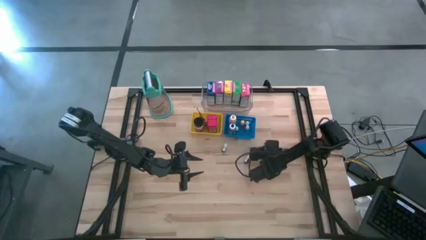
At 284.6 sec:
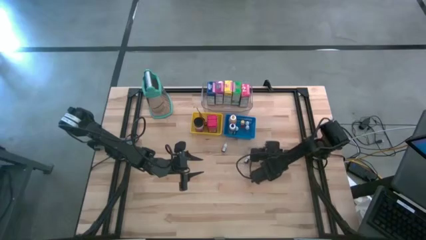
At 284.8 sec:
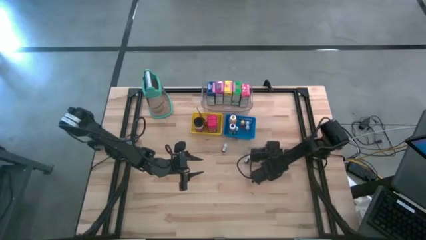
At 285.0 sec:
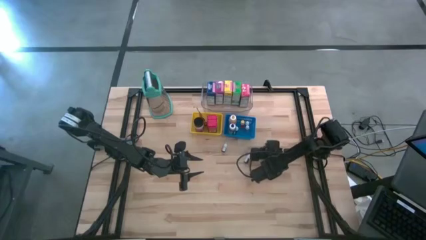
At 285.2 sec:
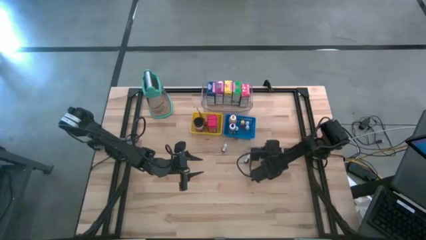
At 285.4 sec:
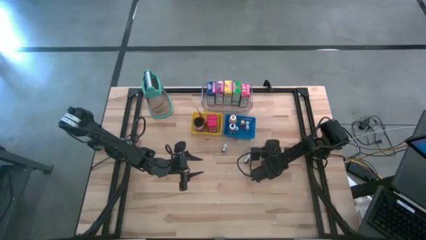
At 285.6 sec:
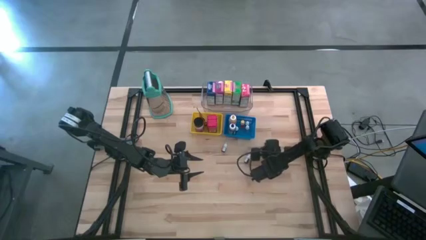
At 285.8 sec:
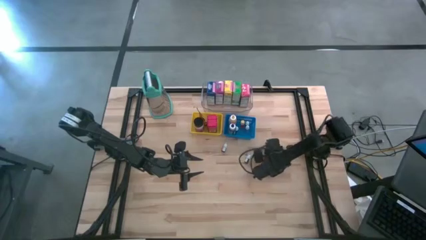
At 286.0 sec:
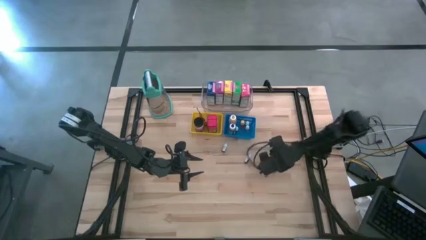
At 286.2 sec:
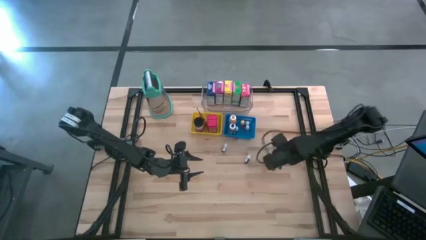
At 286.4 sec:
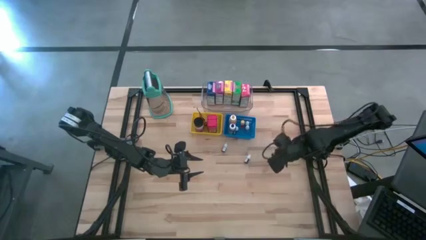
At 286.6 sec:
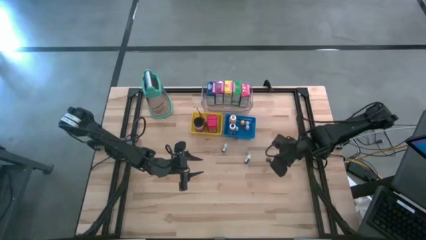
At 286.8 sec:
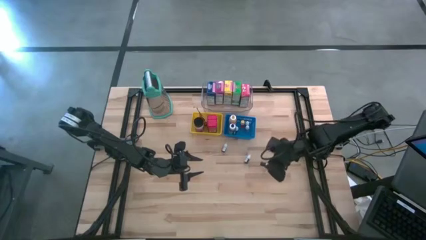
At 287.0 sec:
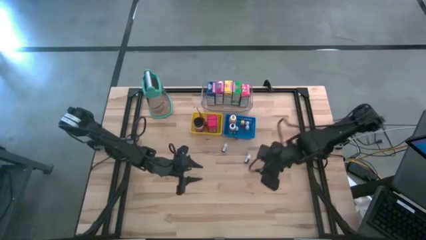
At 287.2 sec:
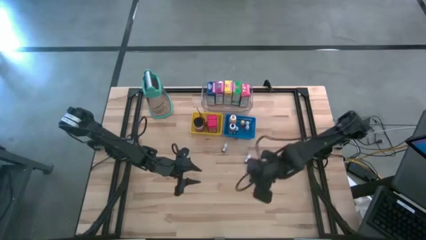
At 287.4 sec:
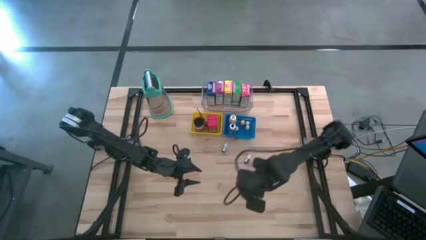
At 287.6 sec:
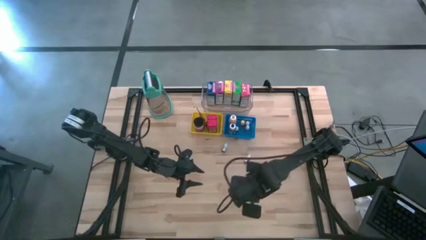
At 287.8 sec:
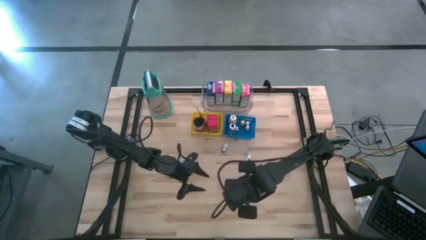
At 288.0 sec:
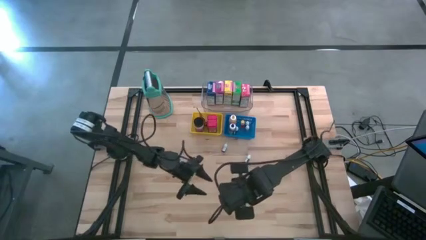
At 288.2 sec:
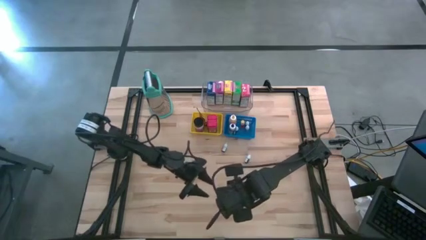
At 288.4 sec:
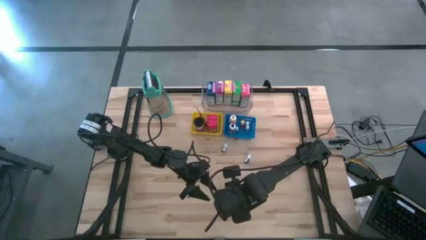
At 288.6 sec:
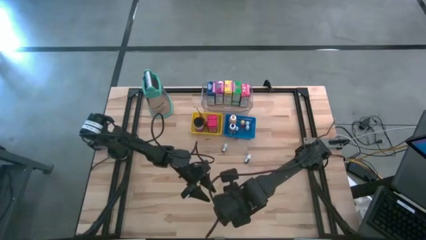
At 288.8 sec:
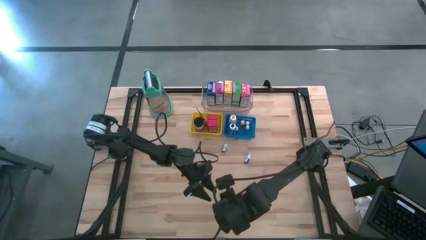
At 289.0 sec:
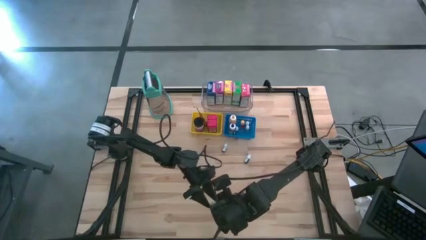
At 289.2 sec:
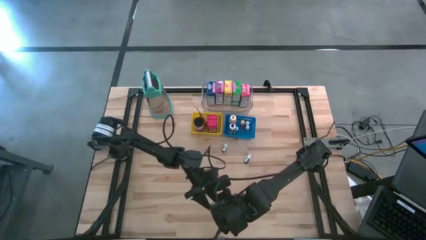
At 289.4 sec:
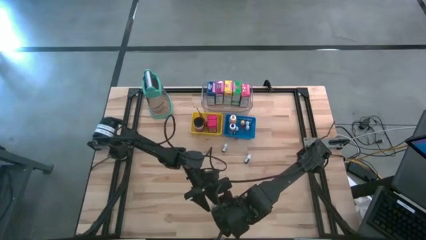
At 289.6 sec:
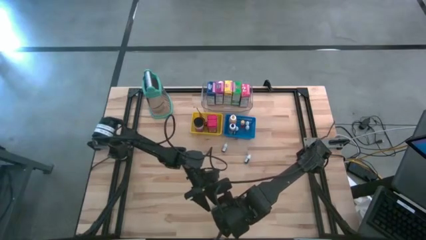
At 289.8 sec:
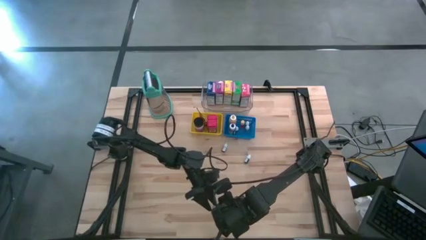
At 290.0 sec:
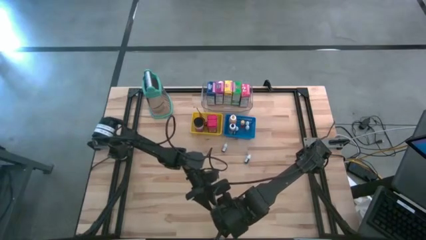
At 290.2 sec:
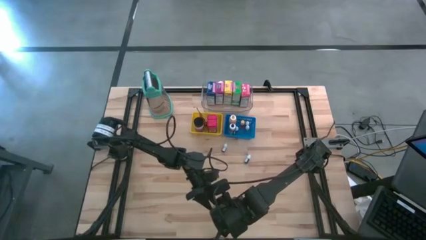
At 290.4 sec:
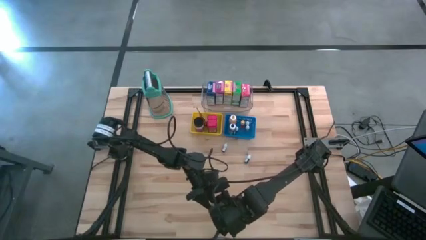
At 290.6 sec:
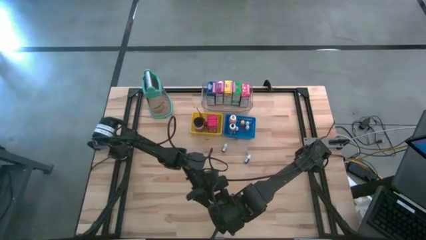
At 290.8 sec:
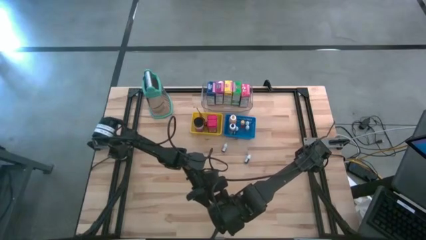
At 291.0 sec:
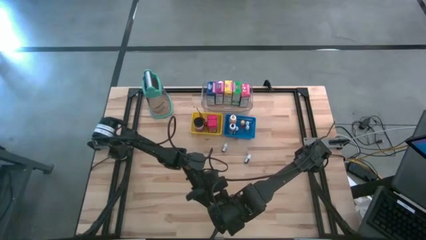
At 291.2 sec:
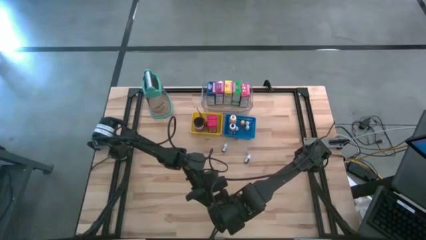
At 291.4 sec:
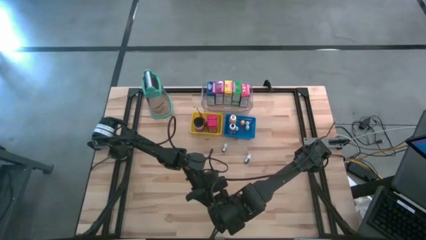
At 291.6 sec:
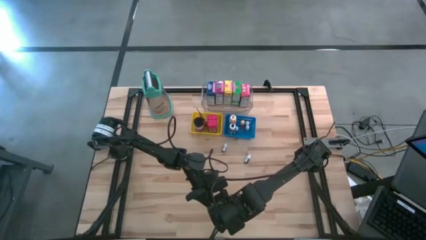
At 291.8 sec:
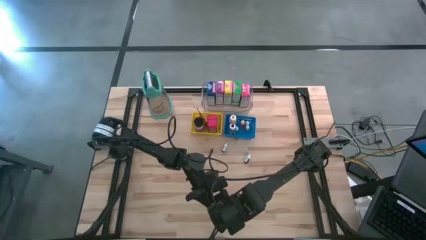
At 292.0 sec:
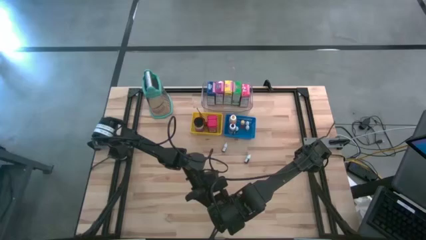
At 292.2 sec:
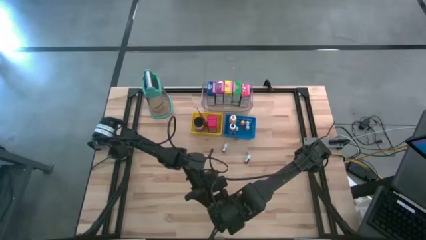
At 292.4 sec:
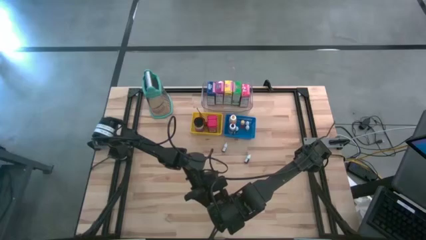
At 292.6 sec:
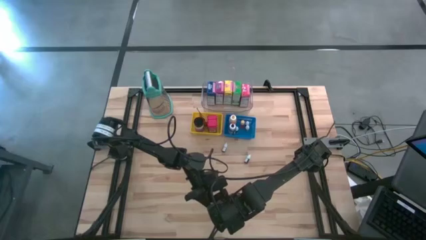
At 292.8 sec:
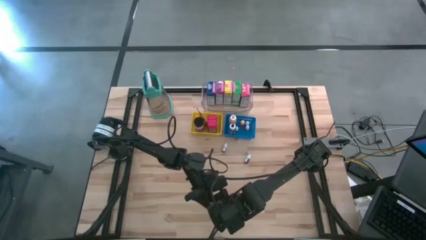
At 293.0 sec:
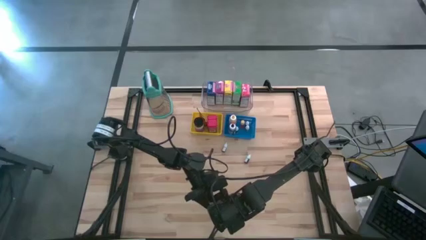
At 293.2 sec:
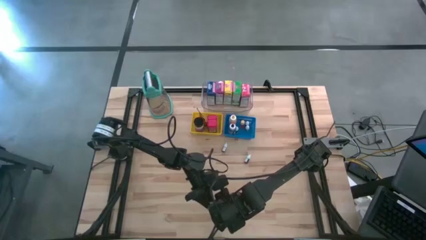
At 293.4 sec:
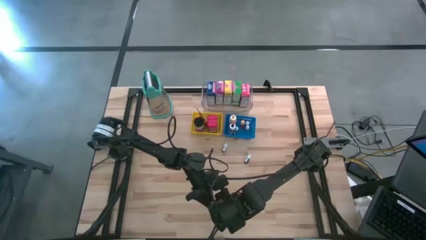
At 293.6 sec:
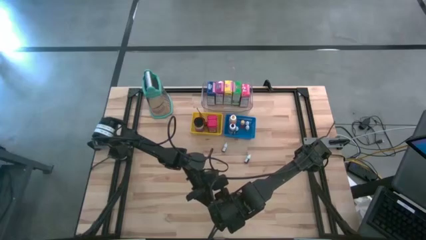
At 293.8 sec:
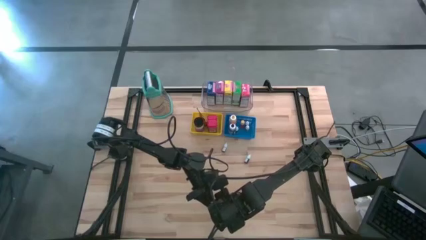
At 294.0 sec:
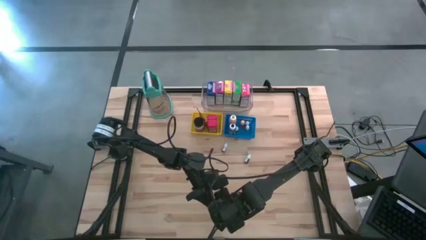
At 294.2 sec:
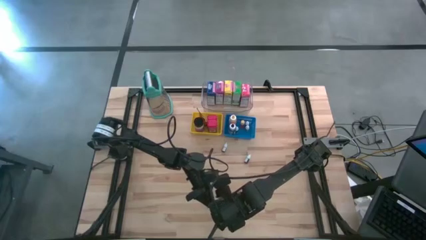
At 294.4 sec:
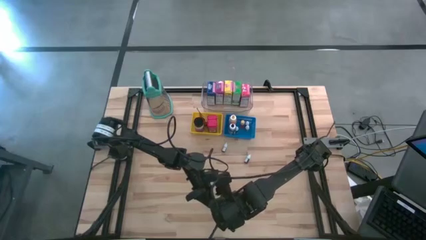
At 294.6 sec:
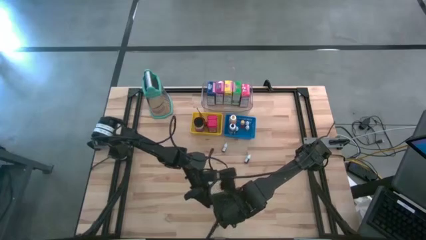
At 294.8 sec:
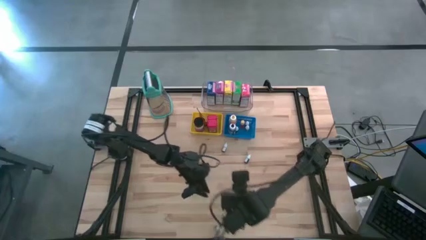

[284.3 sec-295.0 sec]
Task: Pick & Place Kitchen Items
Put the small black food coloring bottle into the blue bin

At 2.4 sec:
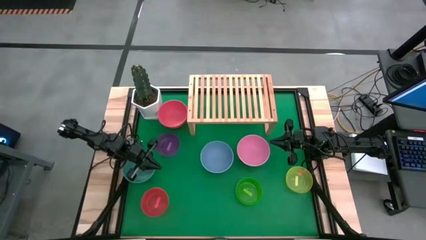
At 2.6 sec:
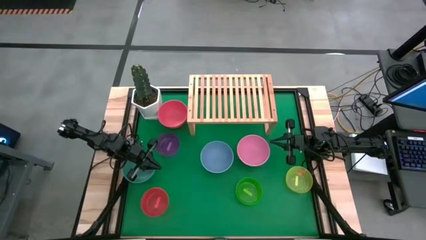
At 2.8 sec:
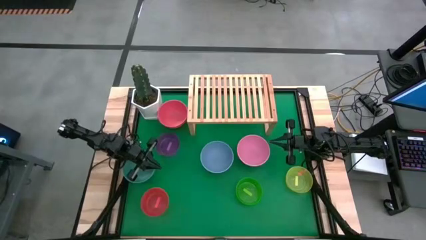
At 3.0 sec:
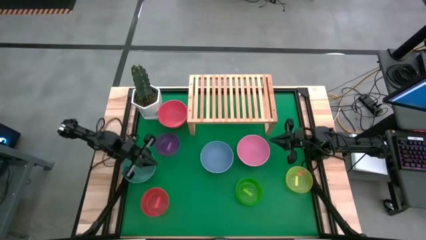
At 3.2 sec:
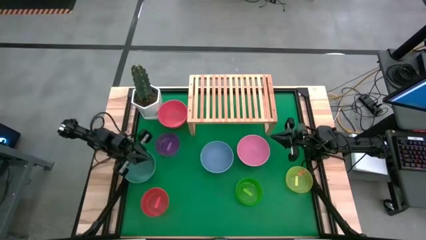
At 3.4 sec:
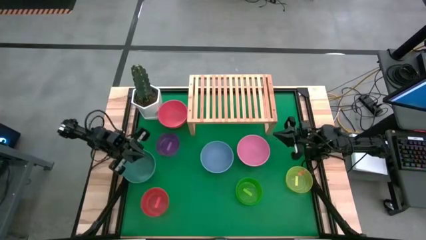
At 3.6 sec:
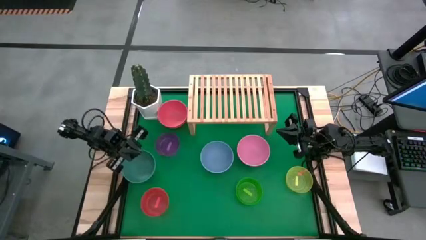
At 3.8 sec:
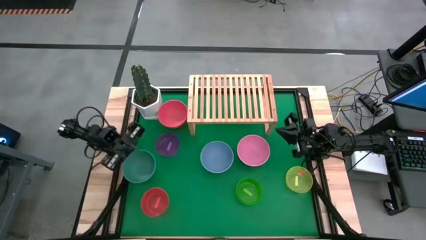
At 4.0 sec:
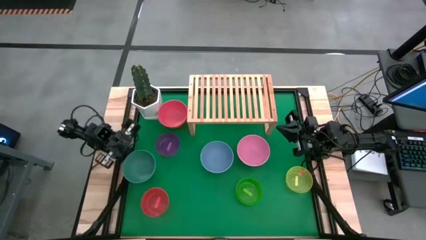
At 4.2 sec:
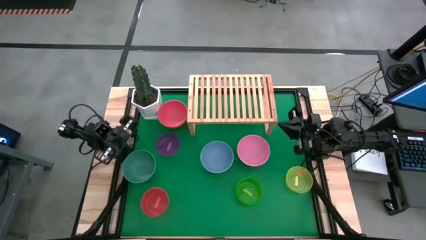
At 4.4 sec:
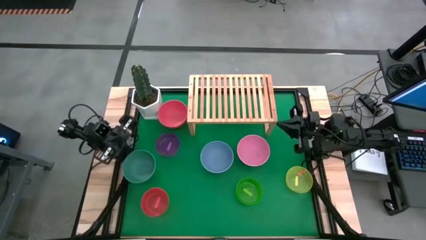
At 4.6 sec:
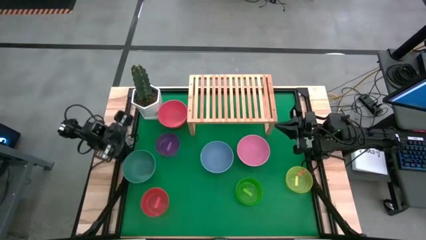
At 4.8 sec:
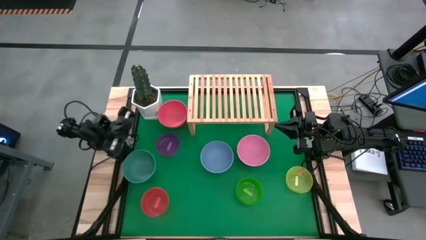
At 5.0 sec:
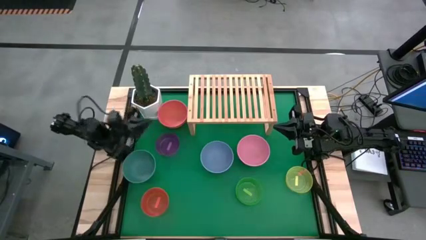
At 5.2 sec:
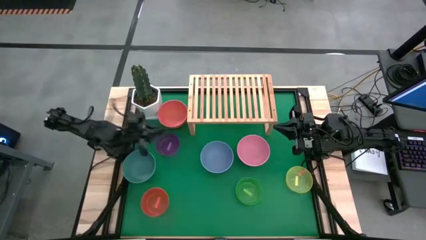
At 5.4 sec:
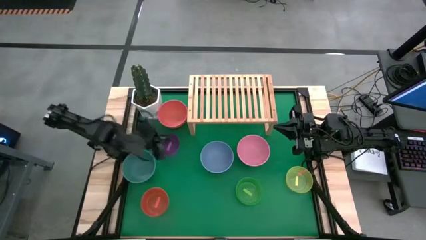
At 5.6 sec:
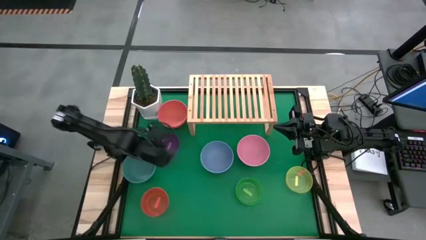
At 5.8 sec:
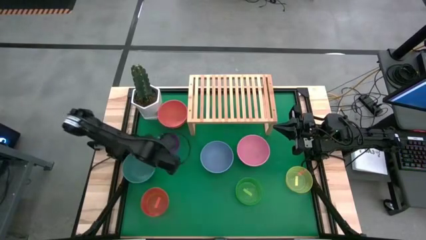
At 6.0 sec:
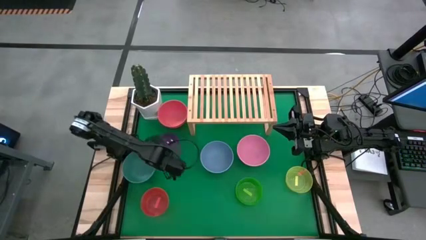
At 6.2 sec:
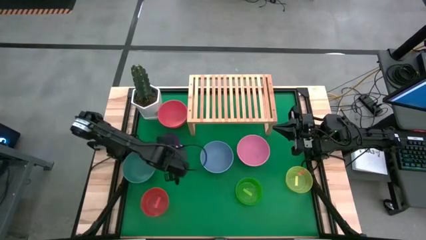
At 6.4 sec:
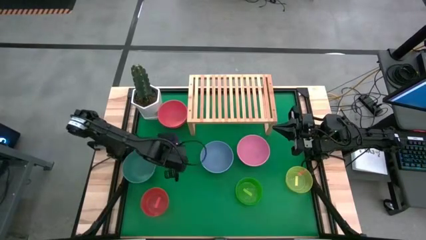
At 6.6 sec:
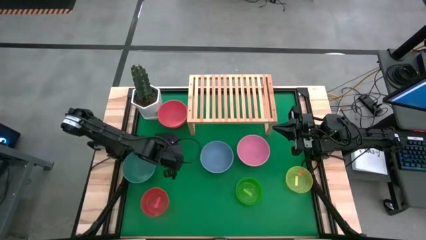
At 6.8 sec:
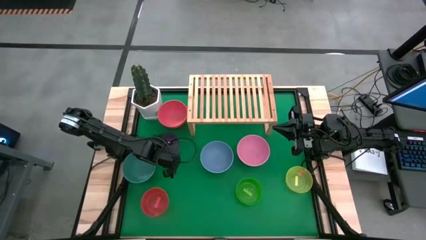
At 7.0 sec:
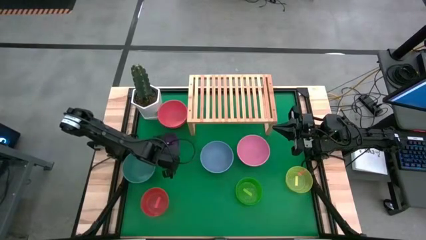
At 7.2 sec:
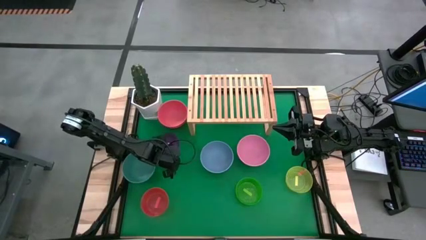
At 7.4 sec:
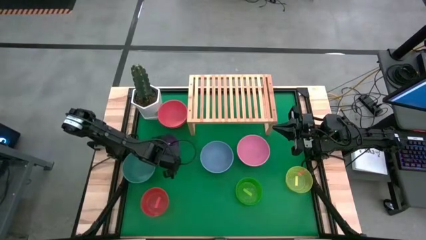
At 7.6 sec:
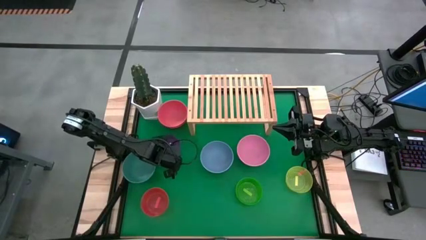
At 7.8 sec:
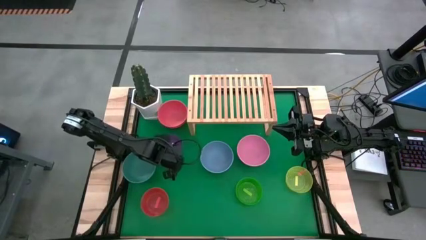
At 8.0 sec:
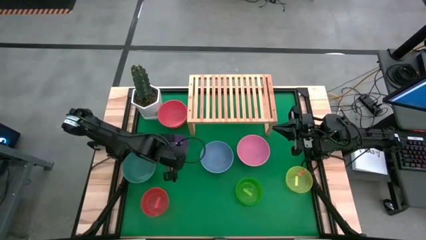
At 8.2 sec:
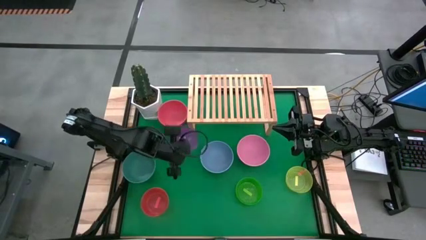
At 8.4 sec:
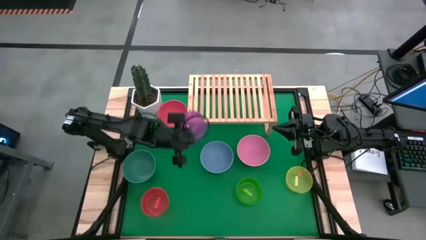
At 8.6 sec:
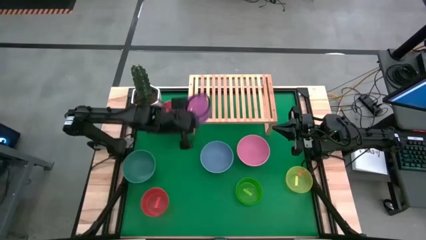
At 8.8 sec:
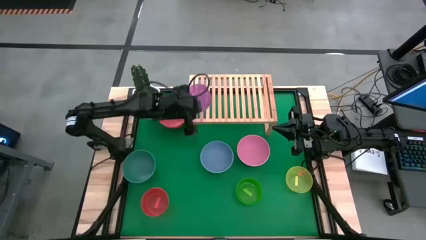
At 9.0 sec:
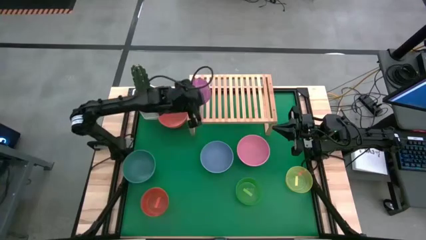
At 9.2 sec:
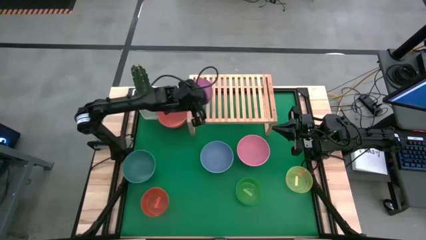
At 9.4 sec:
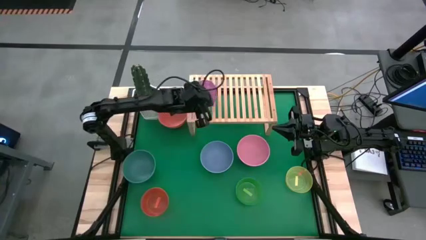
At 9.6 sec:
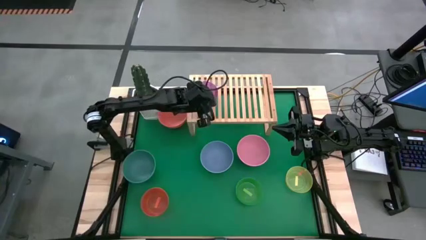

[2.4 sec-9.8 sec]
Task: Place and stack bowls onto a shelf
Put the violet bowl on the shelf
